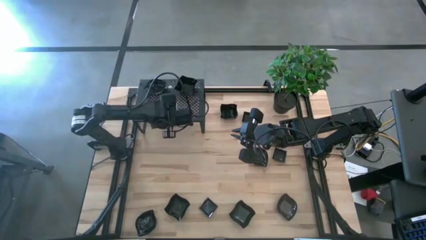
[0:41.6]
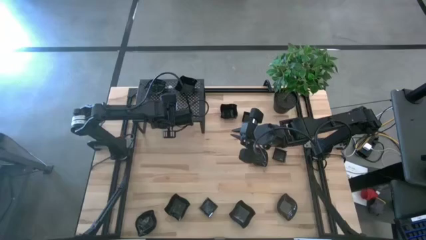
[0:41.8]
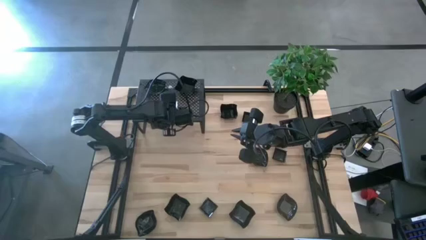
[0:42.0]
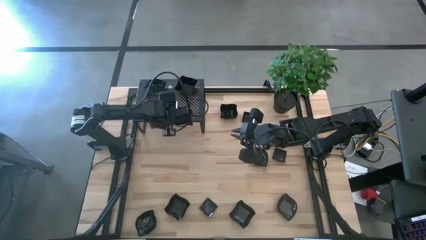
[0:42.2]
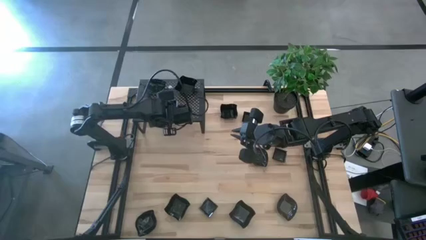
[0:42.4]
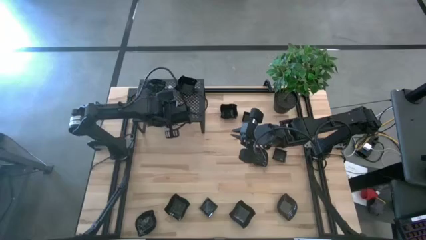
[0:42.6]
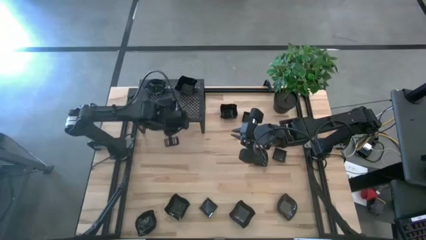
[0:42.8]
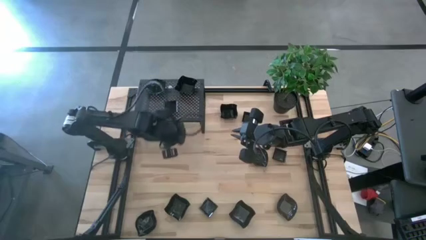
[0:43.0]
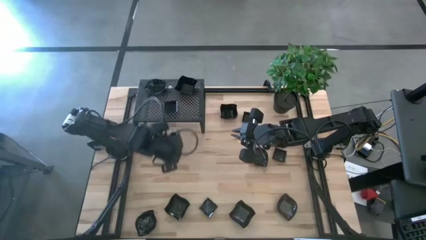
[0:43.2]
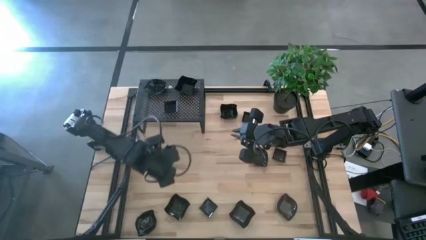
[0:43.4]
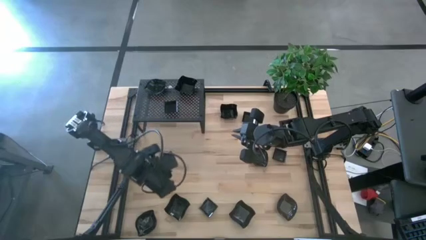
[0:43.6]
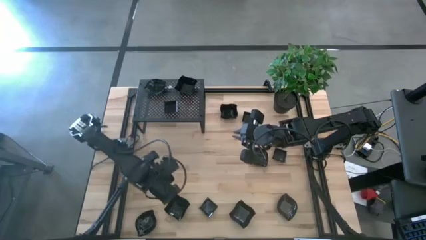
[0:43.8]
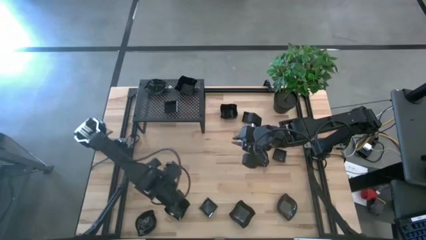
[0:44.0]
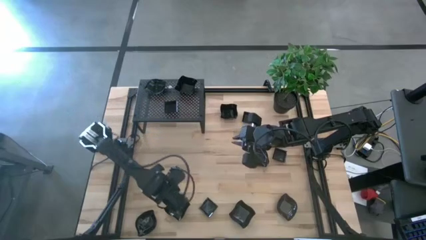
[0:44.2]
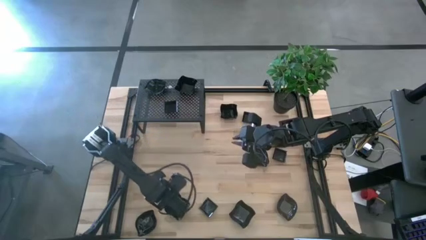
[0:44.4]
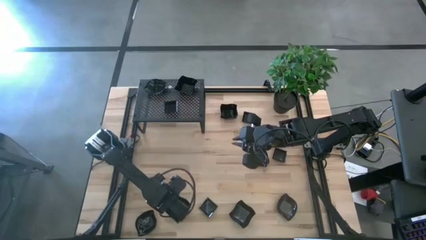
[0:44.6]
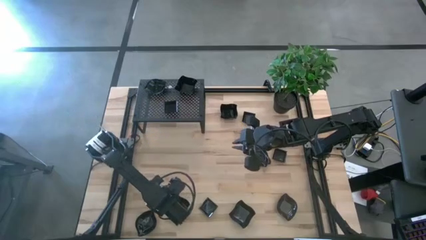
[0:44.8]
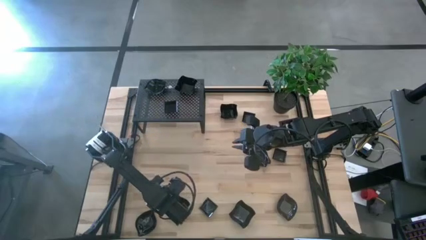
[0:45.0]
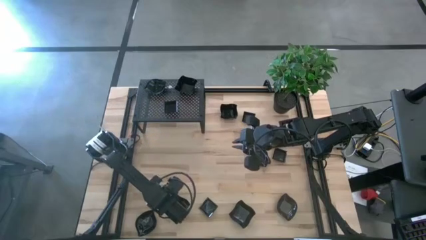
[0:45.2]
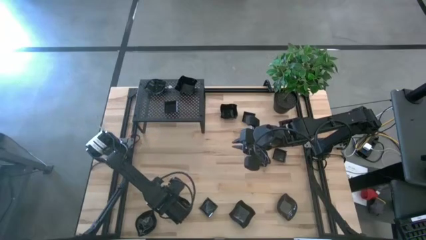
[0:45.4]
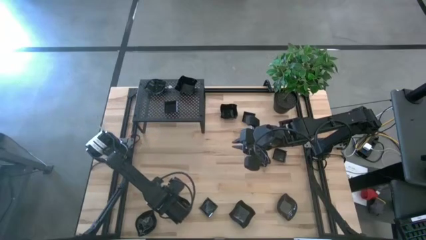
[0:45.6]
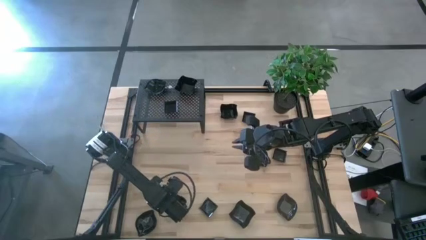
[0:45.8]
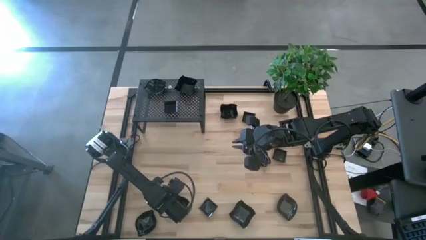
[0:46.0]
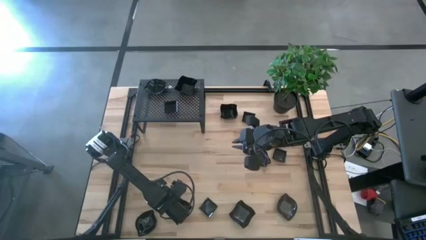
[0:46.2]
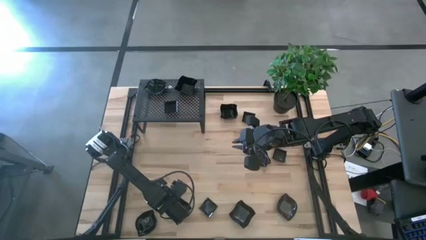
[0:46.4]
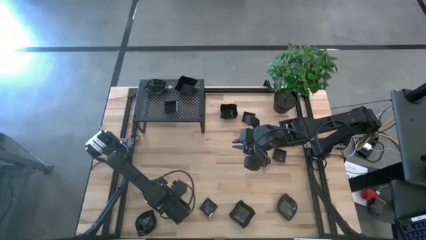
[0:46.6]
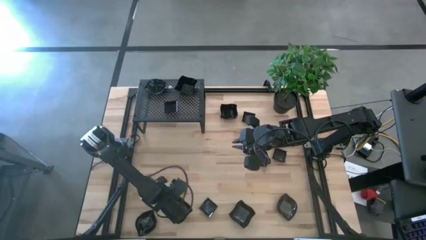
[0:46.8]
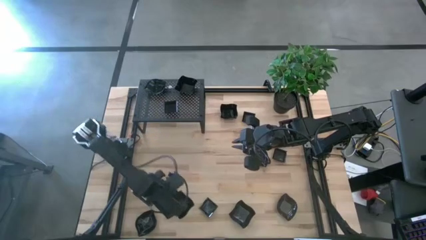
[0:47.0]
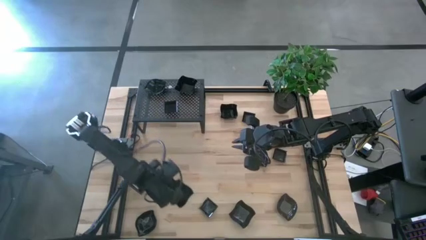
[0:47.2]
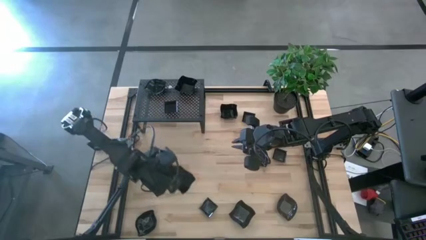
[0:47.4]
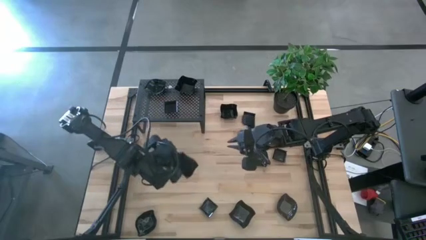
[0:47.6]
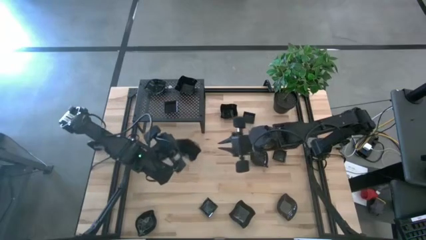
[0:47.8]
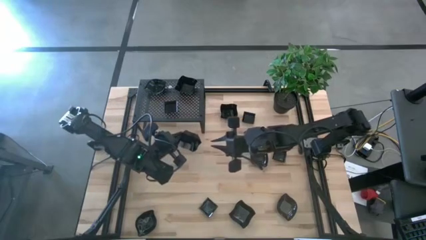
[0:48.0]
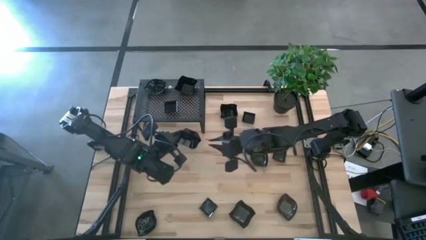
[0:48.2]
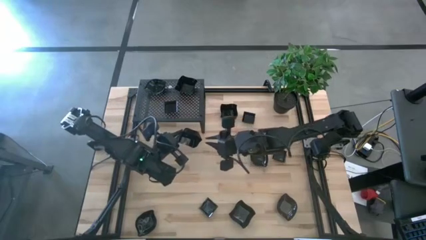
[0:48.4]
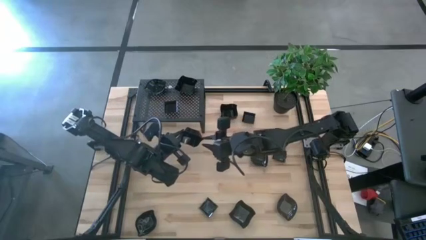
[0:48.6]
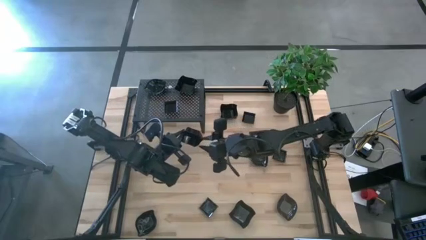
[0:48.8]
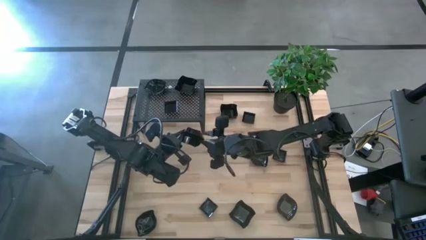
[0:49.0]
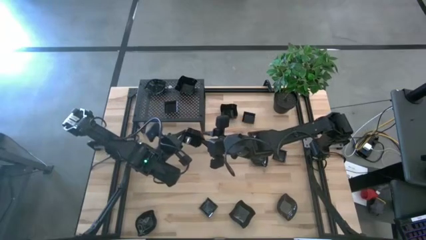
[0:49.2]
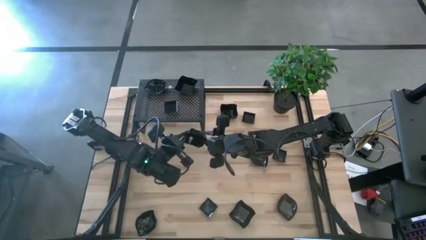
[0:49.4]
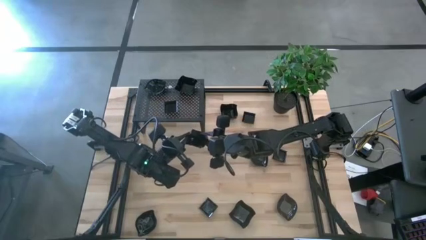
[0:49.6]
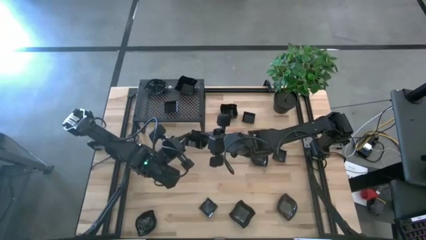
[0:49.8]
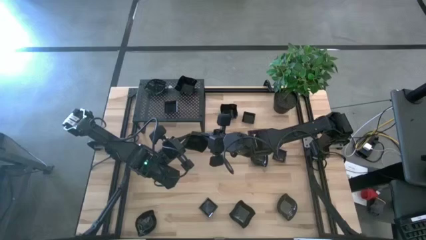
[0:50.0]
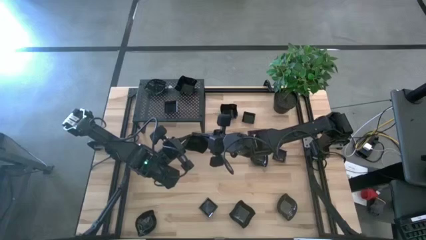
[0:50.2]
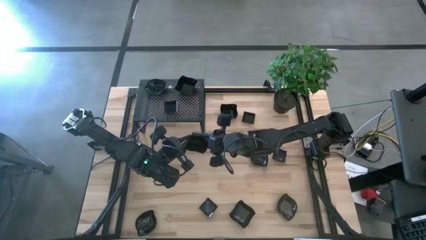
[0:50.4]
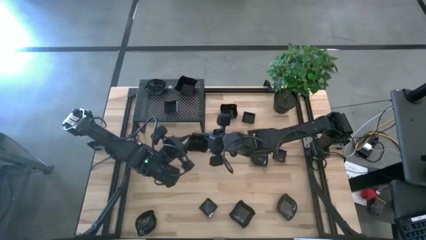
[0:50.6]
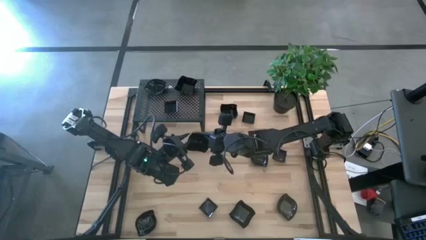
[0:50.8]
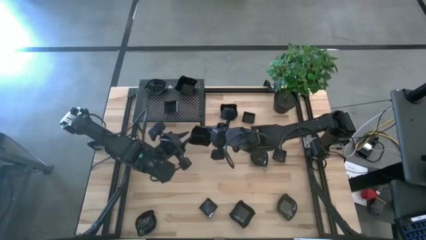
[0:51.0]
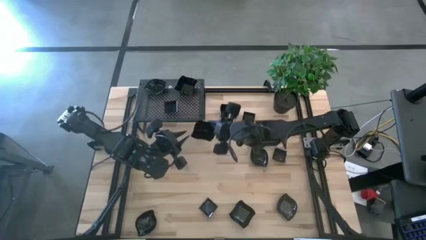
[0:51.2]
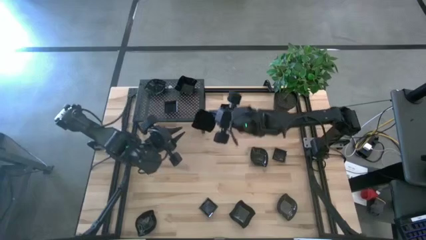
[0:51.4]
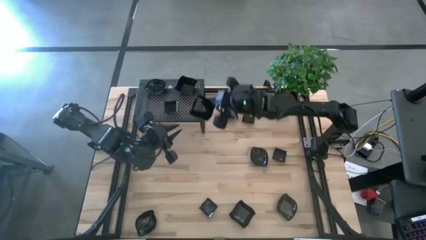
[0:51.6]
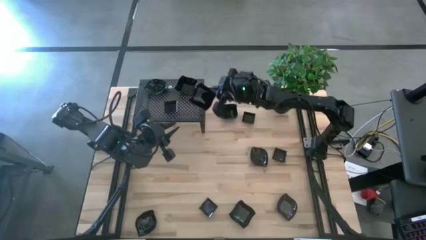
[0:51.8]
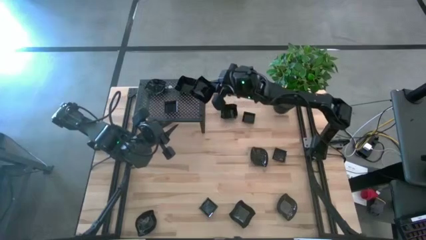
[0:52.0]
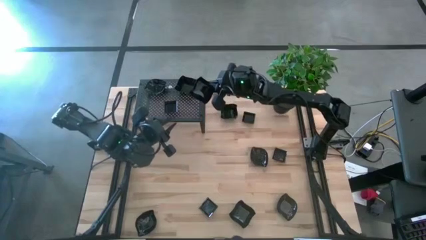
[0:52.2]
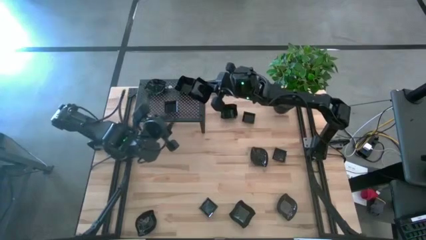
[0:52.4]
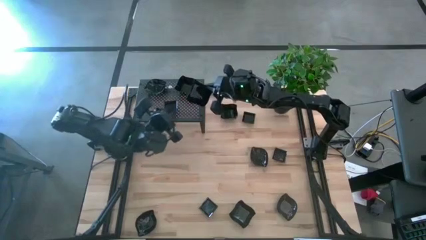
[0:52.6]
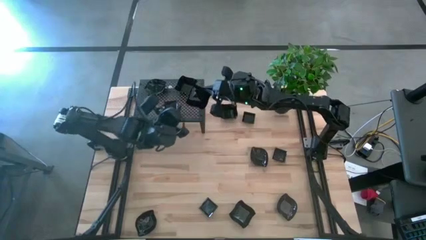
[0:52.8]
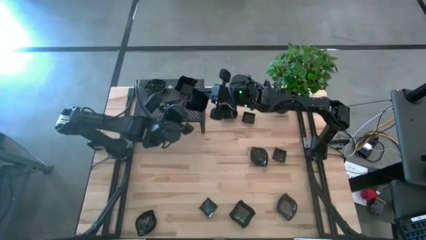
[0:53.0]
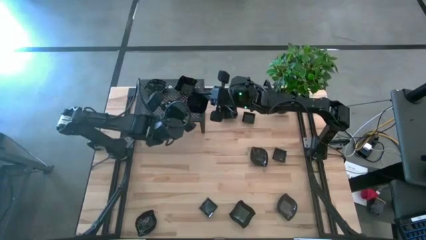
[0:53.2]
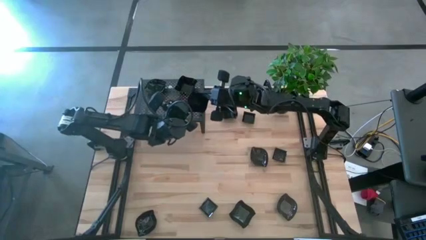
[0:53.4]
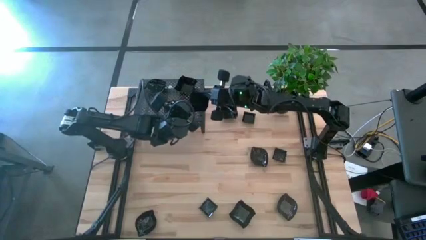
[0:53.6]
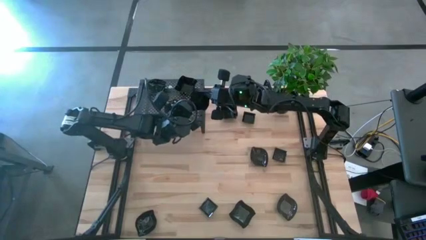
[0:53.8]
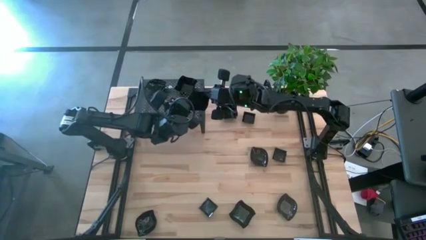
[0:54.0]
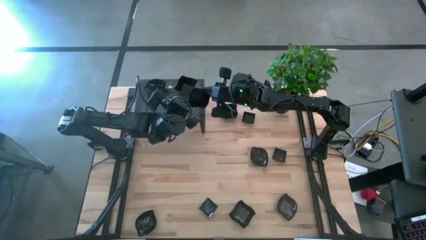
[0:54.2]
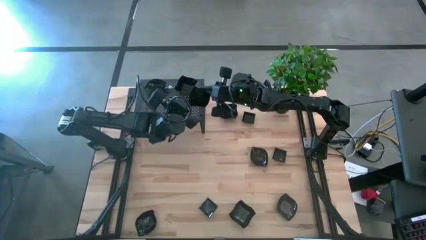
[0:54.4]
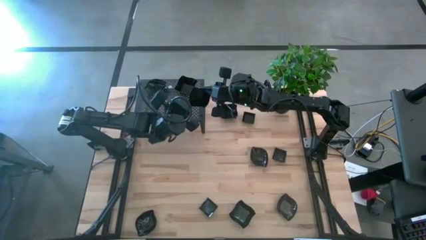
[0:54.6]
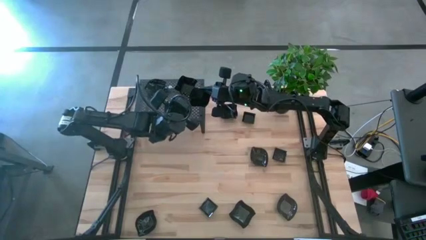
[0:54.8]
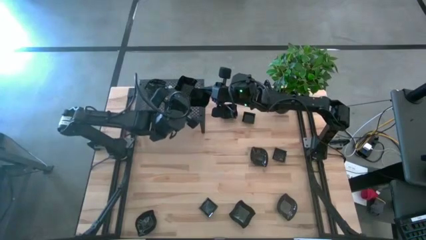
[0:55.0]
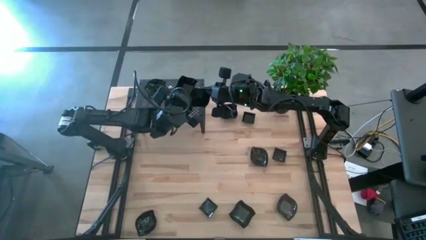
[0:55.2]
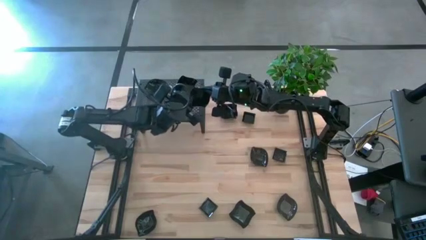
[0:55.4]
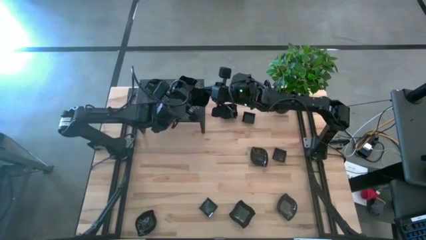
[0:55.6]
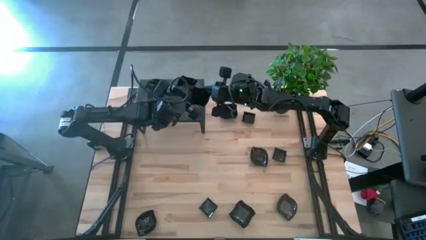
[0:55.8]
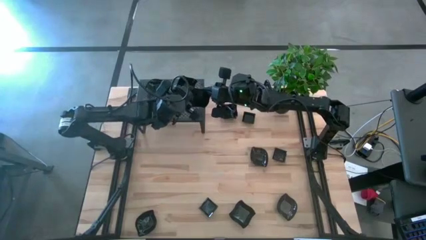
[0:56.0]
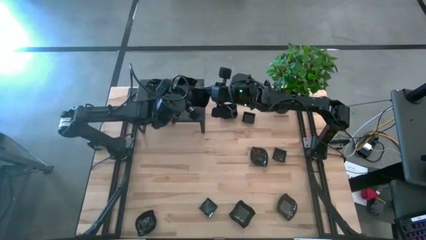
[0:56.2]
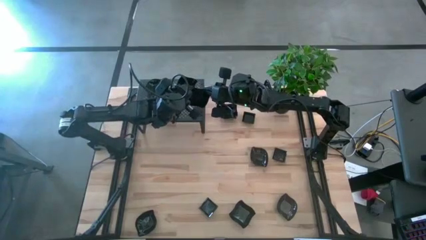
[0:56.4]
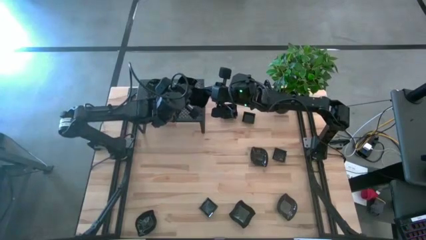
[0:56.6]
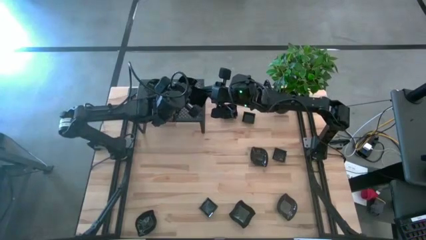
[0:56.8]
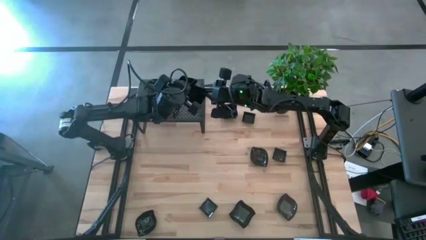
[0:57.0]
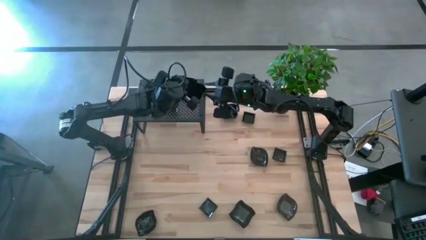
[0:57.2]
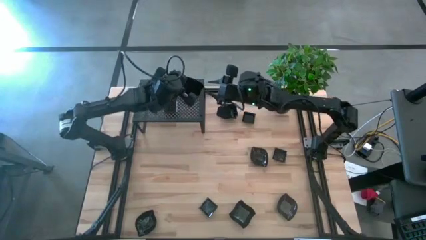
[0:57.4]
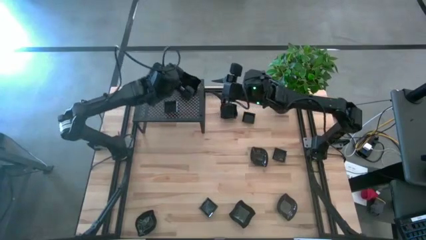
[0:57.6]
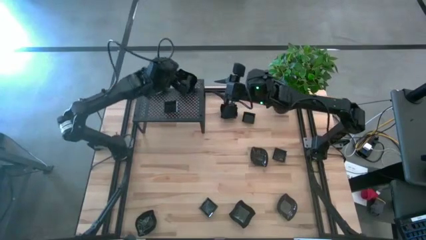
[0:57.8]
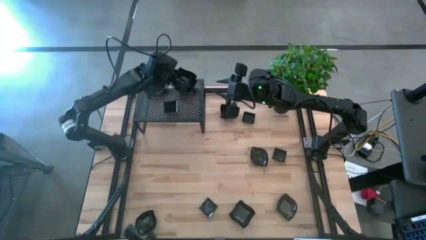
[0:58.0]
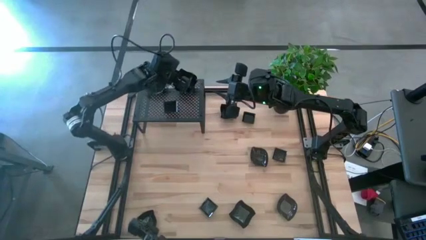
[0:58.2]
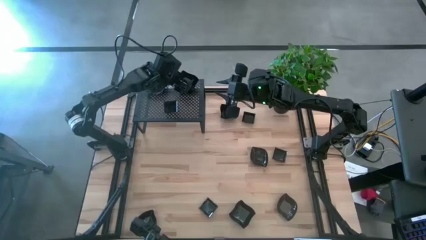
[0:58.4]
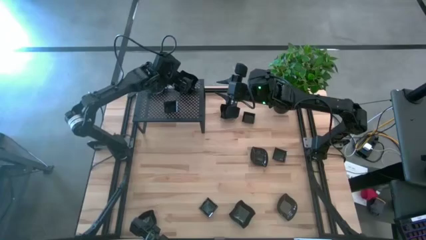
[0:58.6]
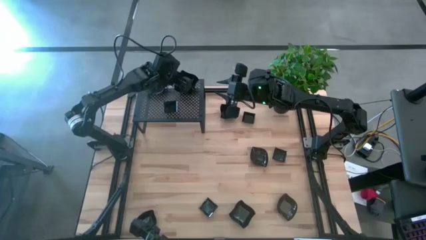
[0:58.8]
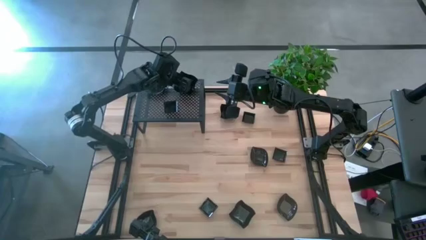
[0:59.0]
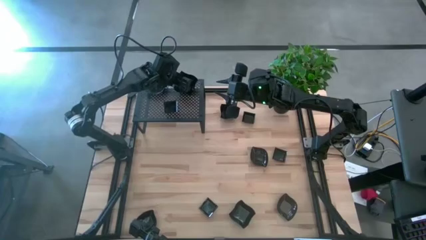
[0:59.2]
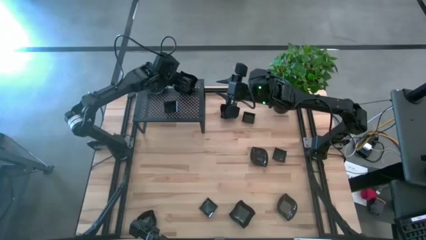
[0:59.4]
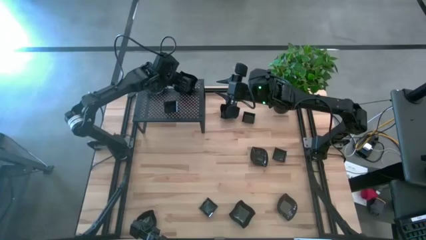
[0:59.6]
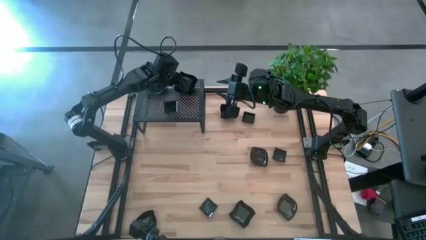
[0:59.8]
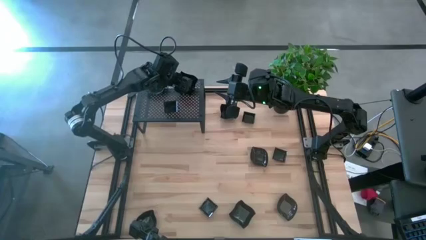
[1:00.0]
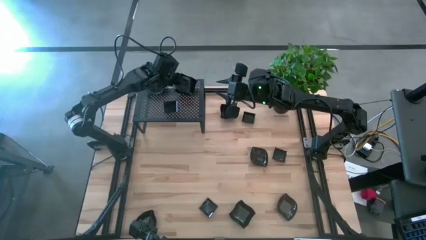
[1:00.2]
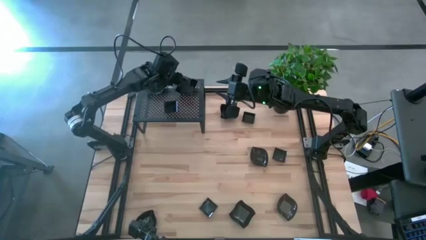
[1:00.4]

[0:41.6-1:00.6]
Task: Pick & Place Mini shaped plates
Stack the distorted square plate on top of the distorted square plate on the shelf
